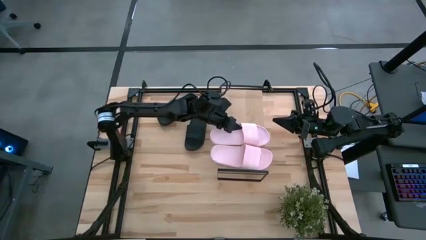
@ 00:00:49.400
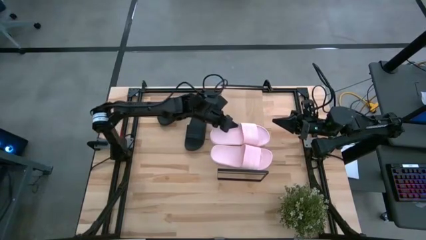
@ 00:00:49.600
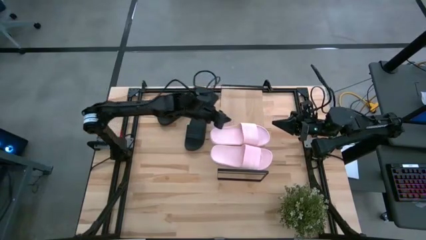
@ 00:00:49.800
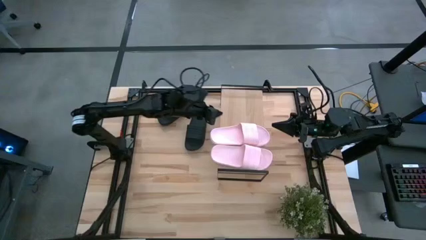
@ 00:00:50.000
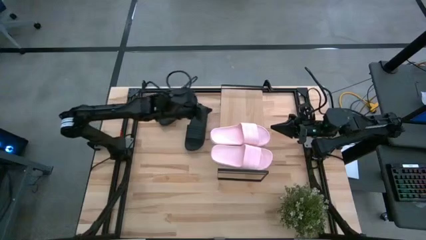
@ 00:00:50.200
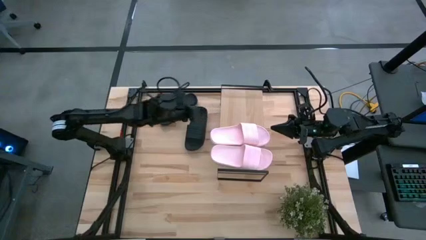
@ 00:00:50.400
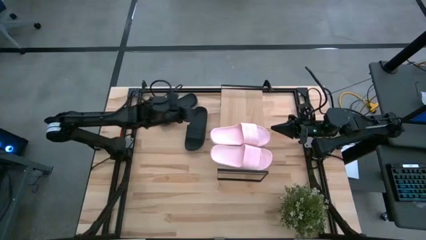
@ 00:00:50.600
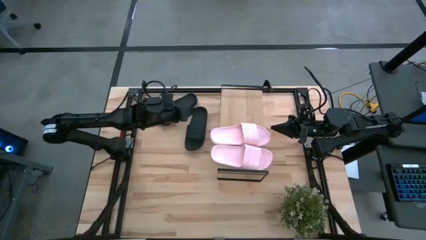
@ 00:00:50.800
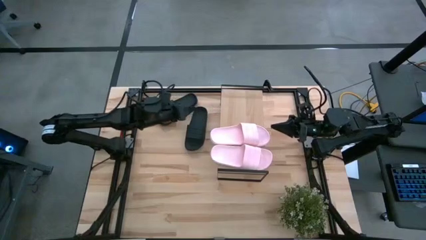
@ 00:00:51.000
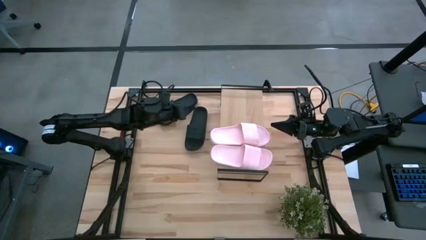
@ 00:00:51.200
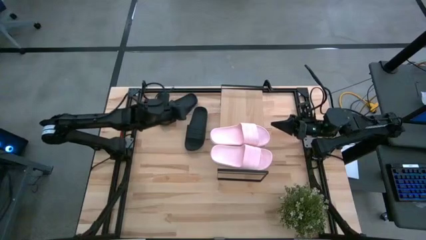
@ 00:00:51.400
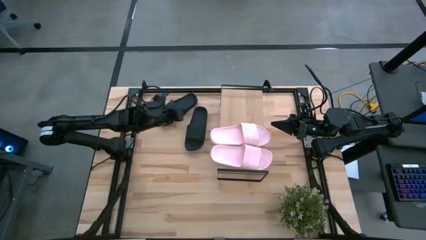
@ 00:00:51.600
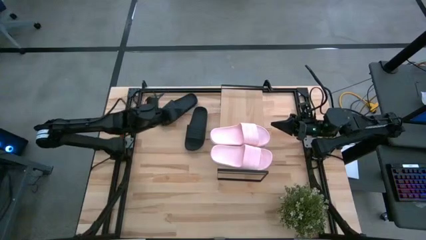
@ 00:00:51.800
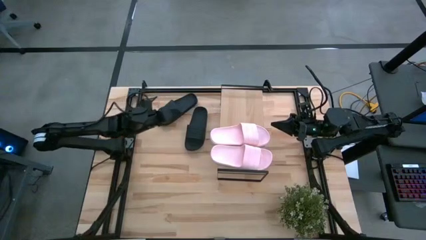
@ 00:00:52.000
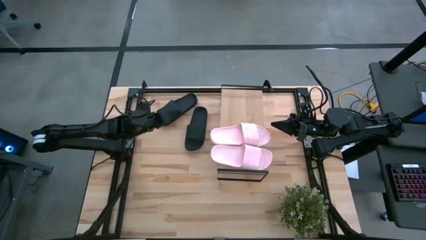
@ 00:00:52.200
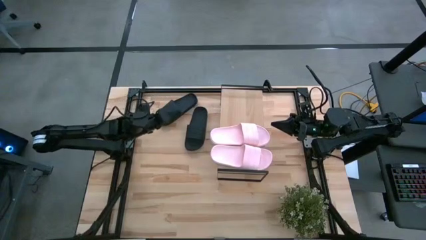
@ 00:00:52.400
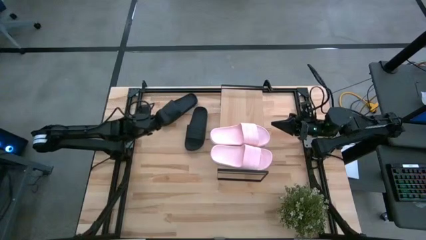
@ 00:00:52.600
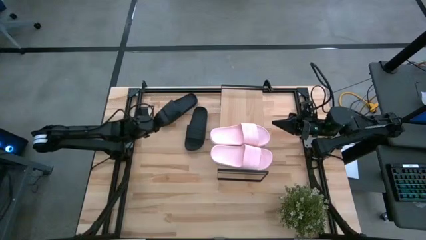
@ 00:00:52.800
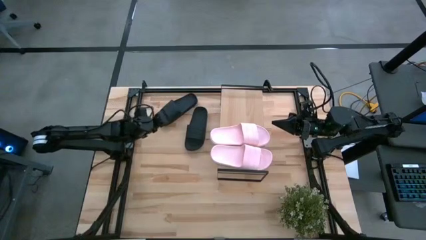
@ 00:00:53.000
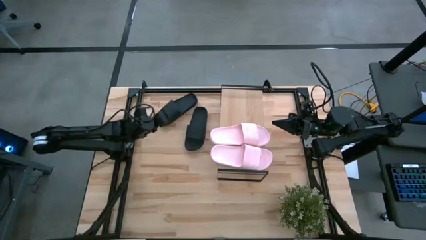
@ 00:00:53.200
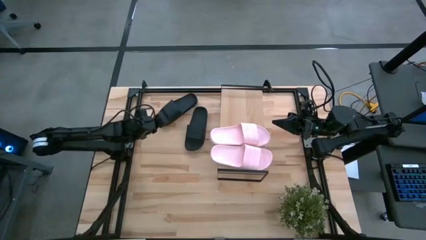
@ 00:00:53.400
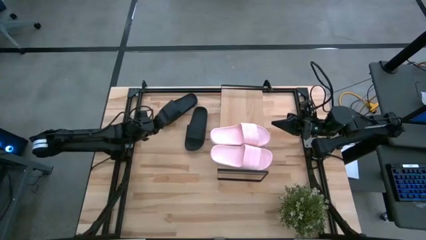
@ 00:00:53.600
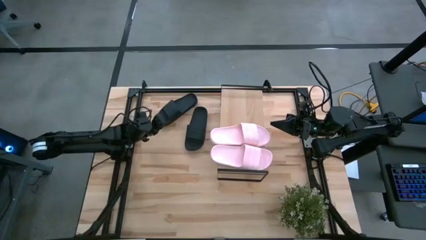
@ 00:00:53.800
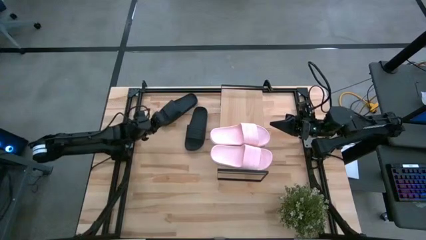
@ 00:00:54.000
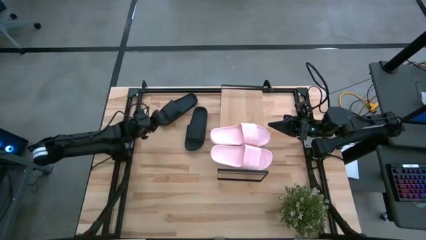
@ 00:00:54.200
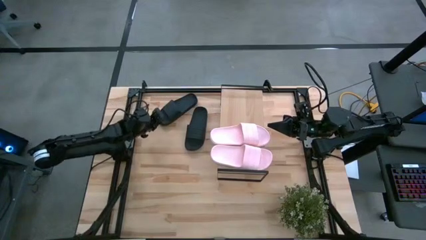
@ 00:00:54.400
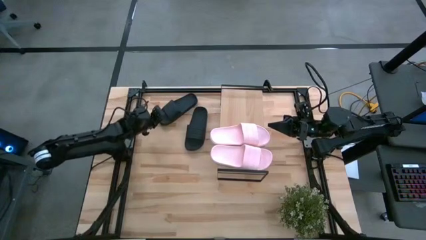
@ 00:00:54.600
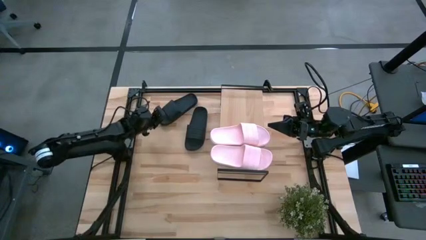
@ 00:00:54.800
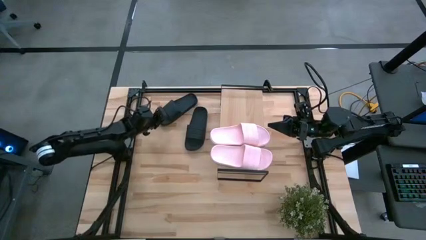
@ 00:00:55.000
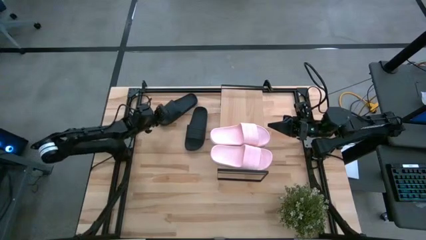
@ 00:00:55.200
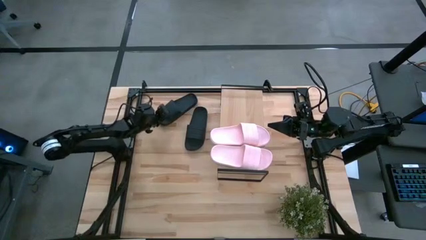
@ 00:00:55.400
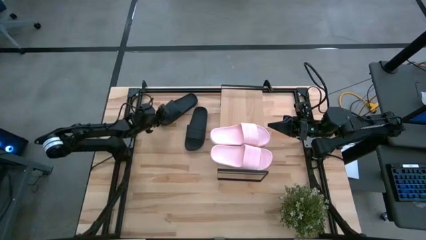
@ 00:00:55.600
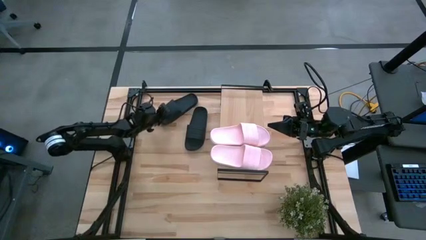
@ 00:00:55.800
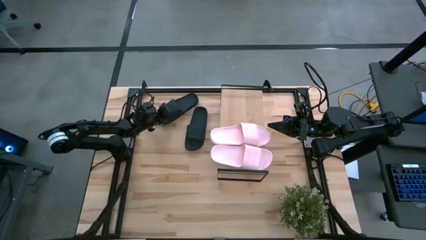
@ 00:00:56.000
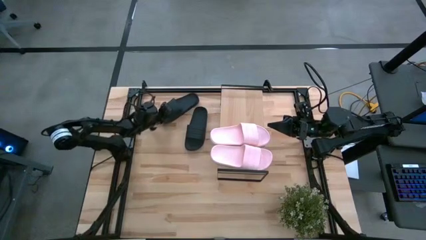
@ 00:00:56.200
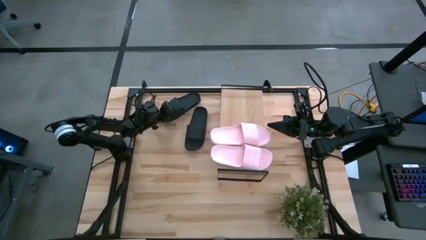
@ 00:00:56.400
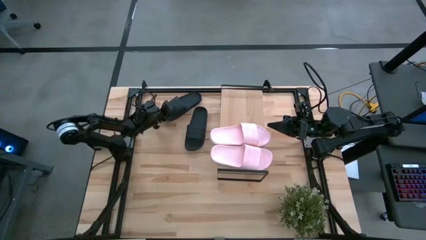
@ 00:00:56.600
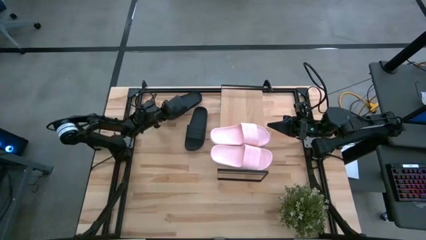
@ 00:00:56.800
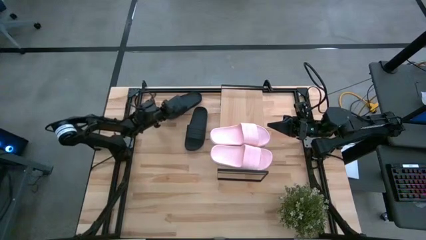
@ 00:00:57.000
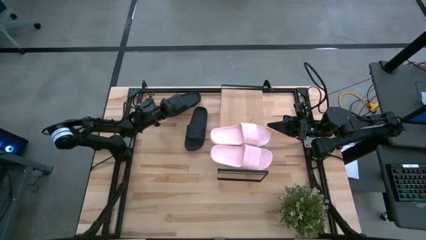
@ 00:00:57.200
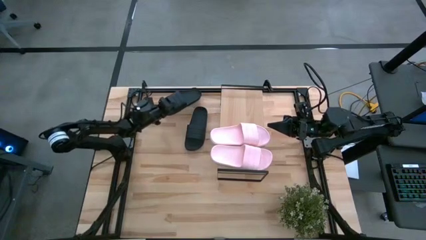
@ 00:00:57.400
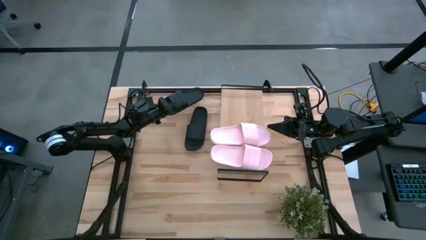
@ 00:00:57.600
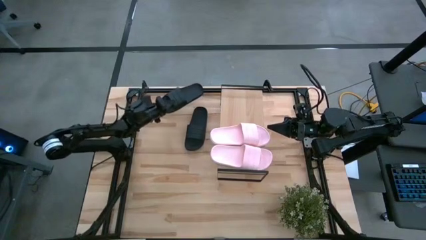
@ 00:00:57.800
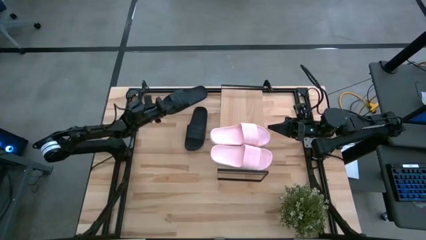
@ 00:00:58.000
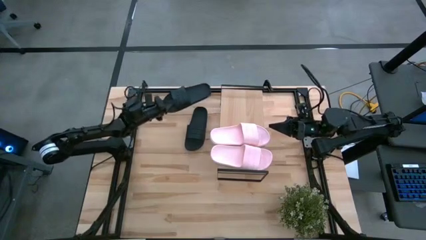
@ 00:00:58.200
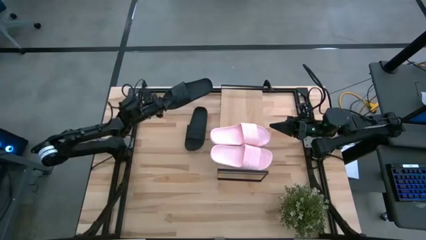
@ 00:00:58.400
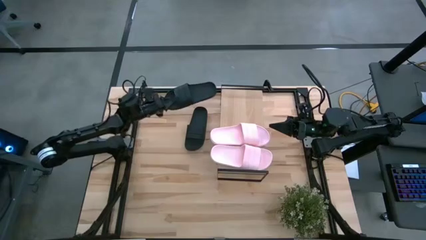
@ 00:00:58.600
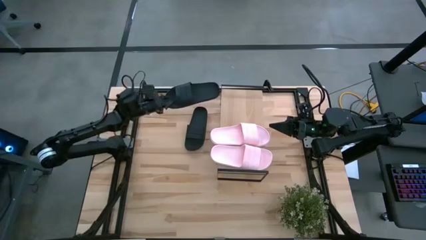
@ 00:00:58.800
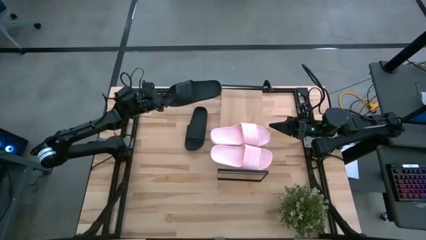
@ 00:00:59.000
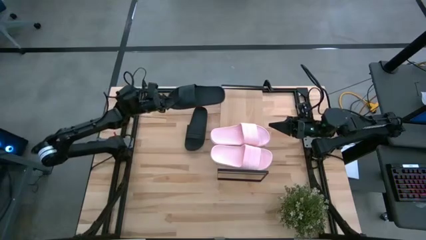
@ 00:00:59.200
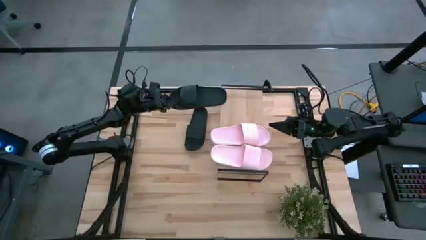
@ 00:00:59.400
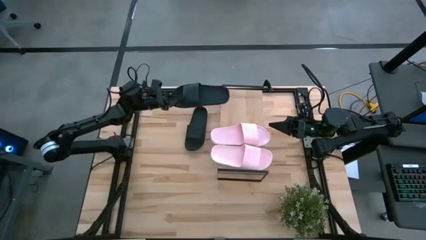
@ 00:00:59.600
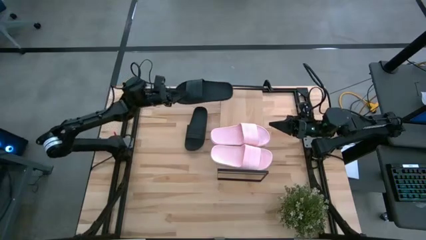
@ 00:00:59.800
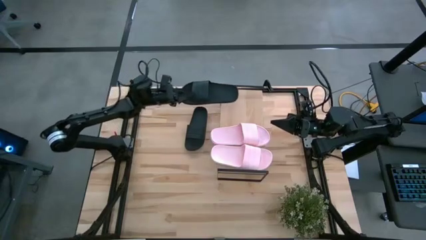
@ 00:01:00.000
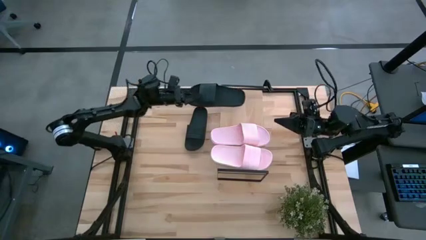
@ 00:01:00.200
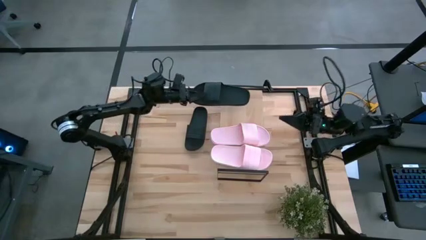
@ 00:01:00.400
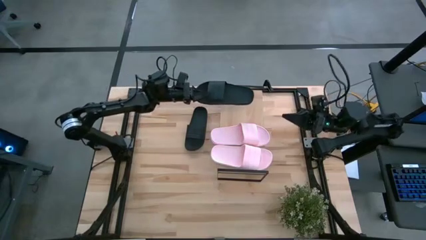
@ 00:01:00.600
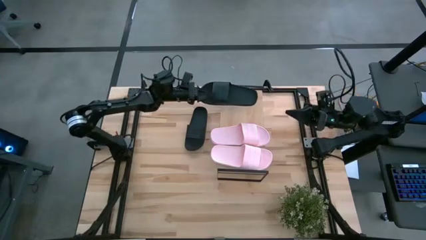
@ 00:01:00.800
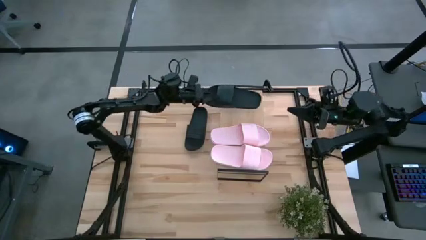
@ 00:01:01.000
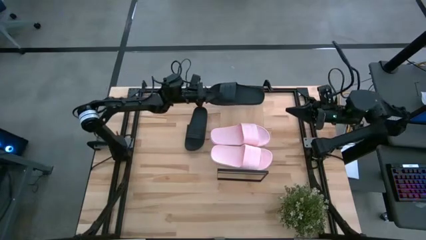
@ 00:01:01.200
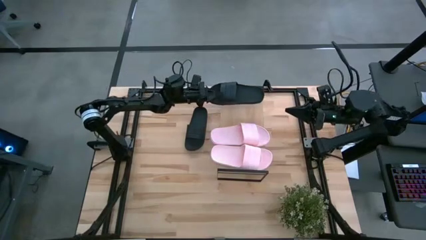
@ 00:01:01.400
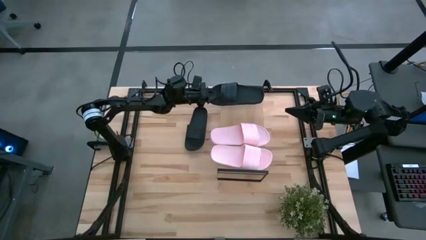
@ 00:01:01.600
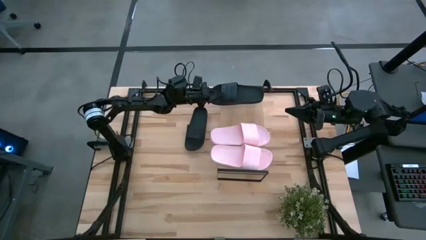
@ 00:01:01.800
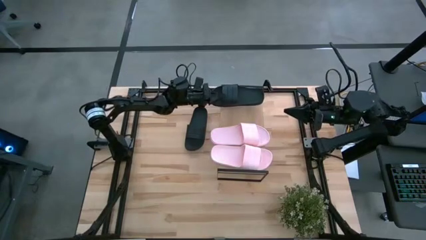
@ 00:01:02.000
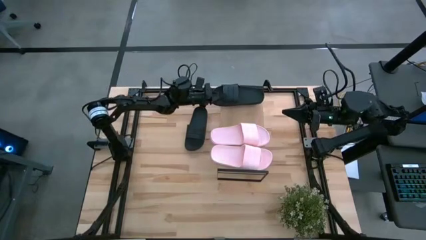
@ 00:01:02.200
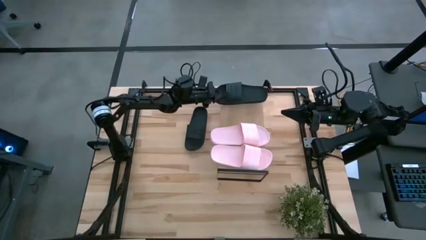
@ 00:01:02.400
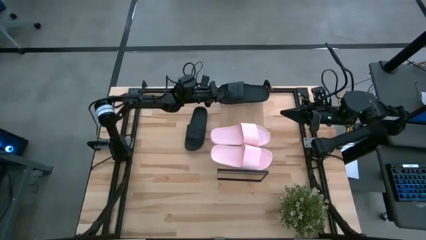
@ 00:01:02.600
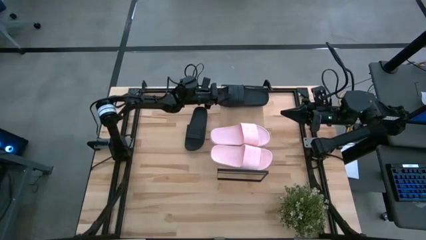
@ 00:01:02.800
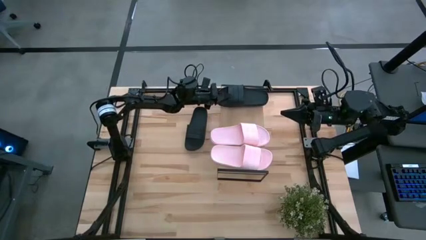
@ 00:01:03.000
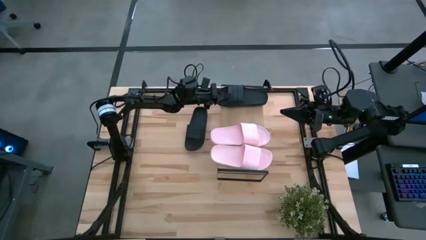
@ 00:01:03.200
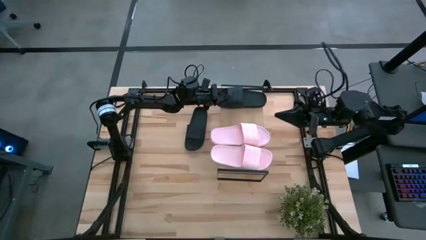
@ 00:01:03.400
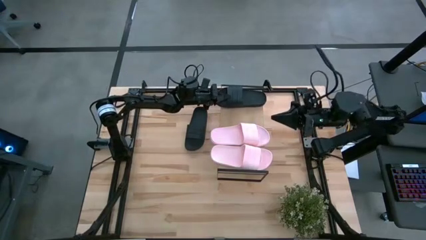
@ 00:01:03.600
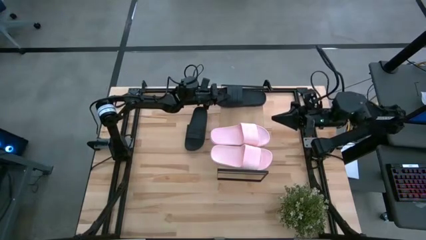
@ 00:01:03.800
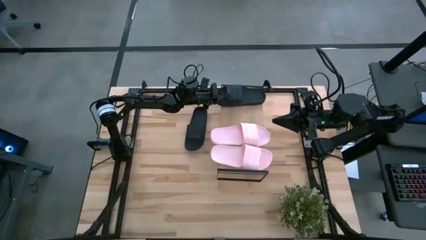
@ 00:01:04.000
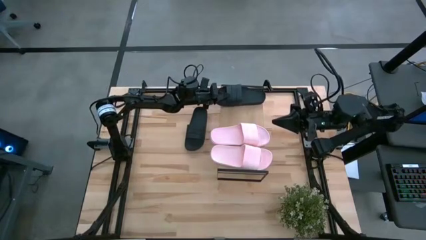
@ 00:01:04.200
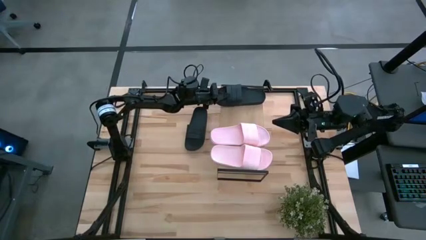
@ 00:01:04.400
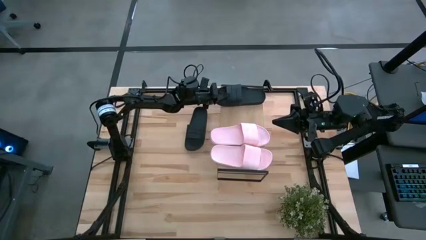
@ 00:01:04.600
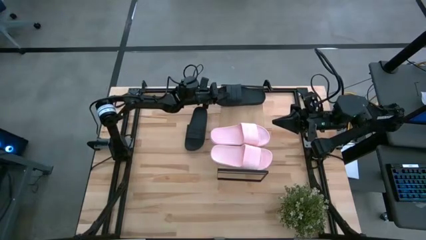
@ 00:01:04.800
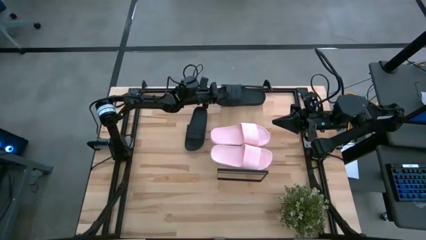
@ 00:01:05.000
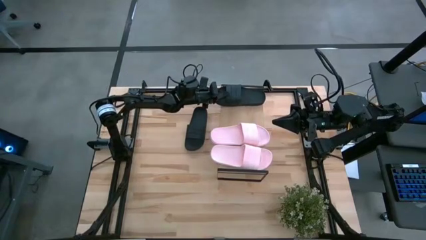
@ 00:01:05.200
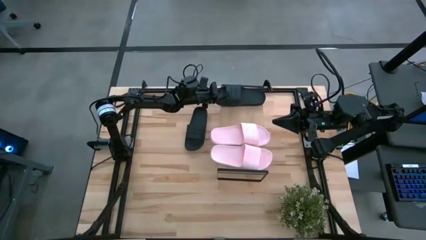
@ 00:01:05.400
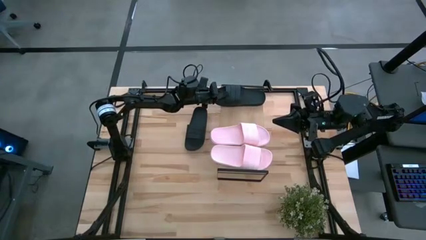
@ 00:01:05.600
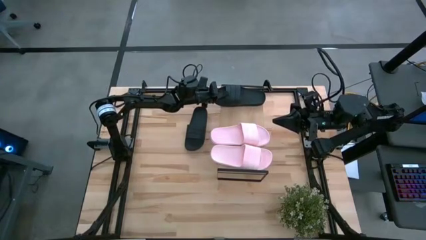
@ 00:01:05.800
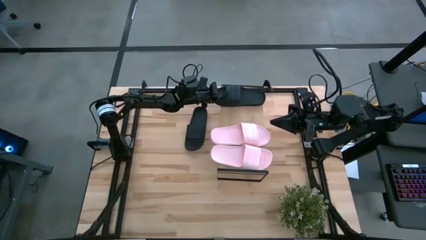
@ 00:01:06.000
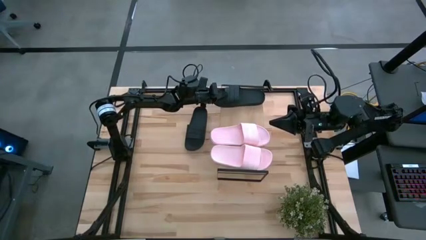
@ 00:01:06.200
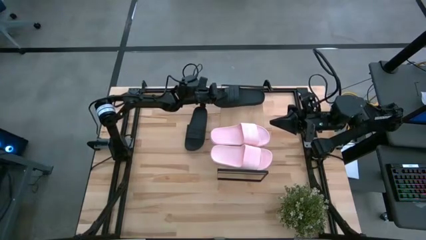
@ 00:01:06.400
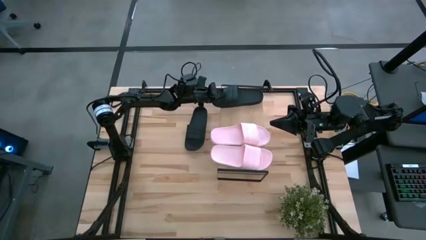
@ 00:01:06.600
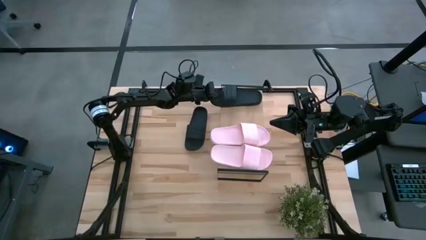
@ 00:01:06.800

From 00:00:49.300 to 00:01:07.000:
Task: Pick and place slides into the shelf
Put the left black slipper on the shelf
